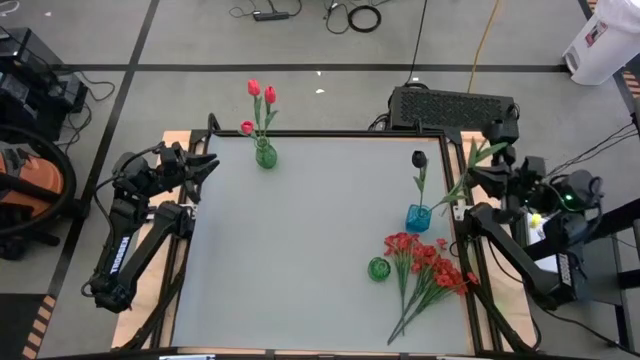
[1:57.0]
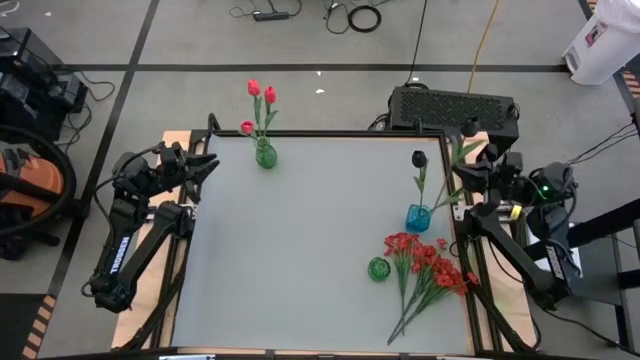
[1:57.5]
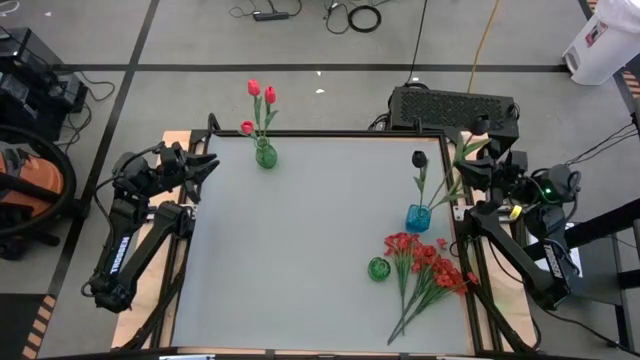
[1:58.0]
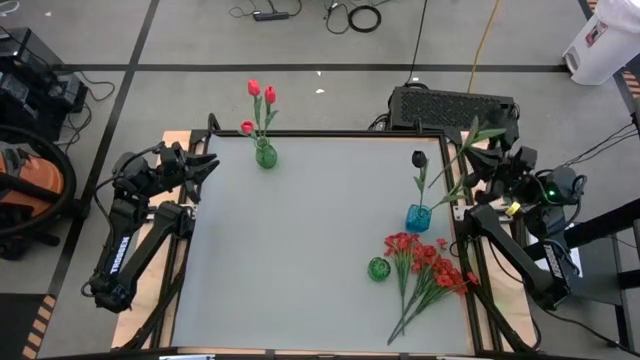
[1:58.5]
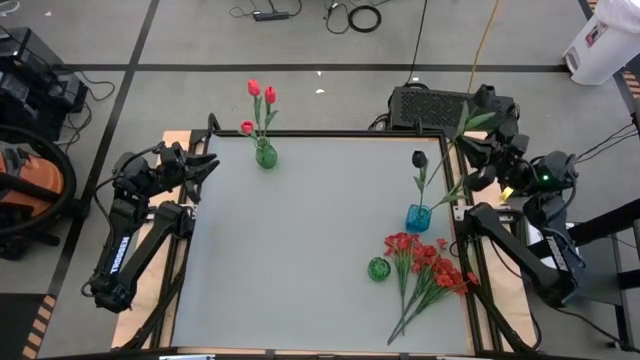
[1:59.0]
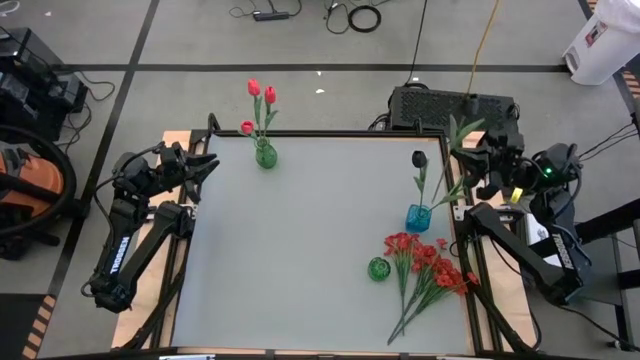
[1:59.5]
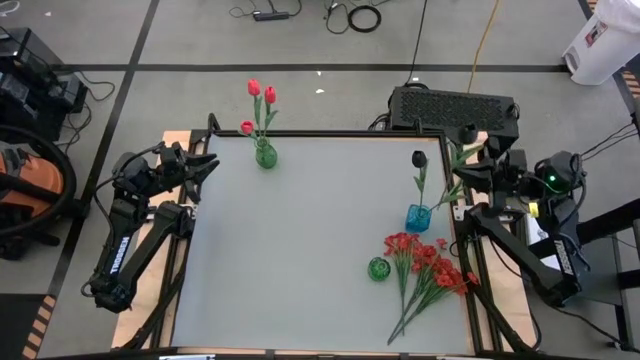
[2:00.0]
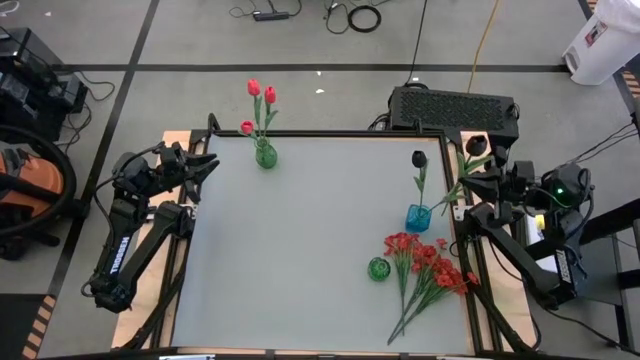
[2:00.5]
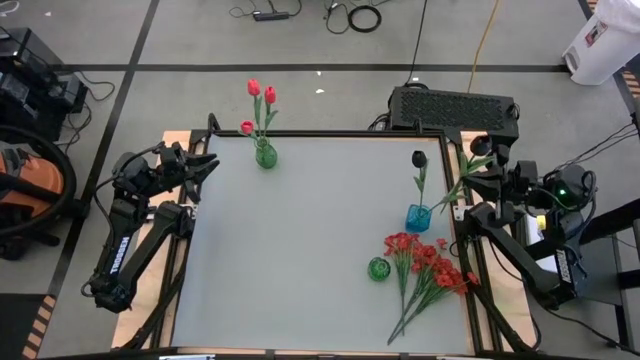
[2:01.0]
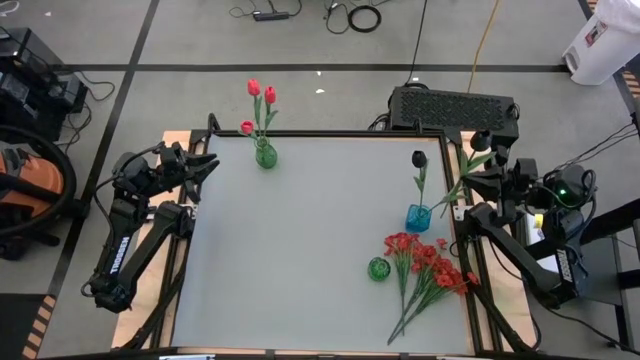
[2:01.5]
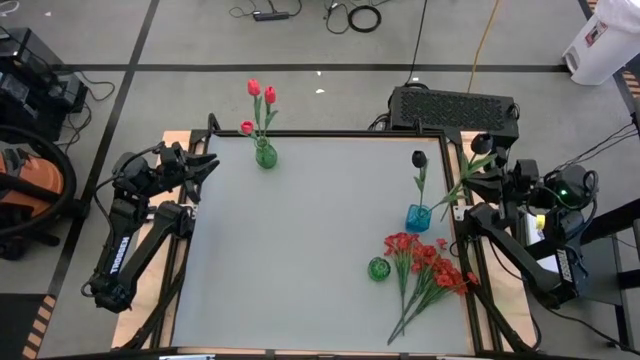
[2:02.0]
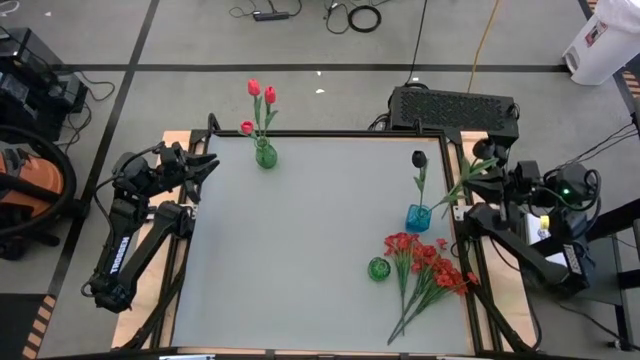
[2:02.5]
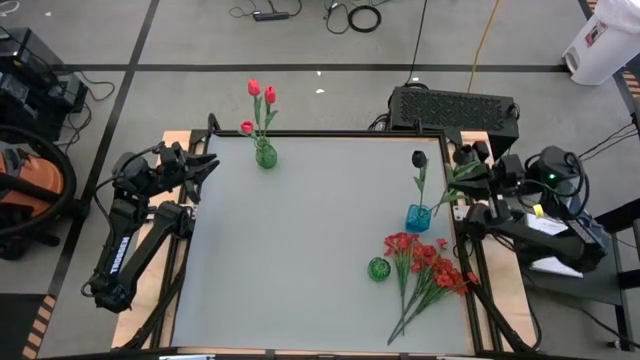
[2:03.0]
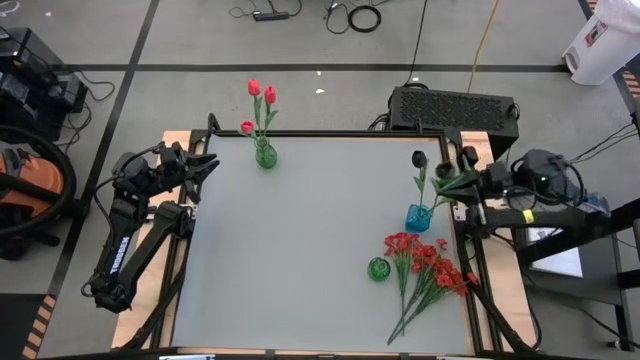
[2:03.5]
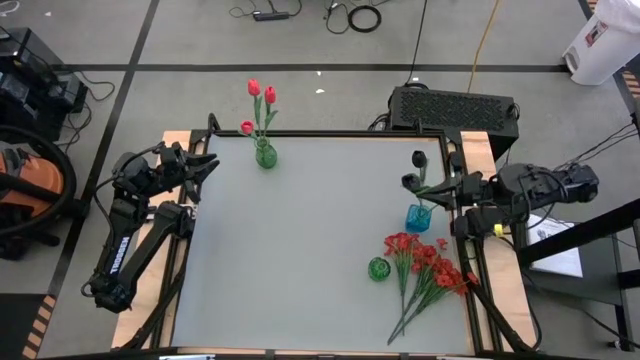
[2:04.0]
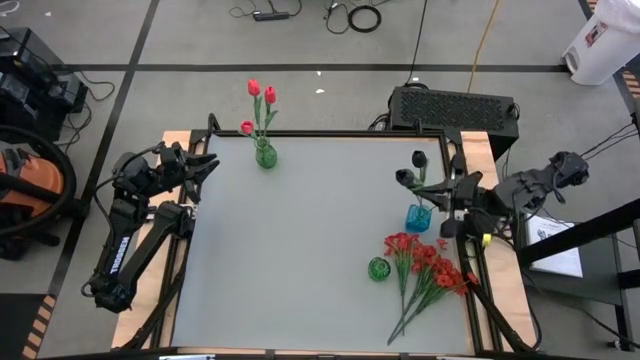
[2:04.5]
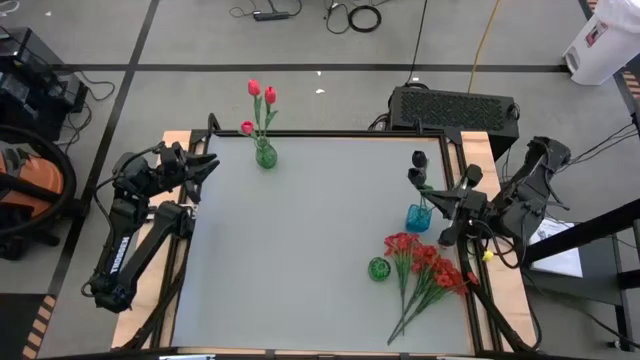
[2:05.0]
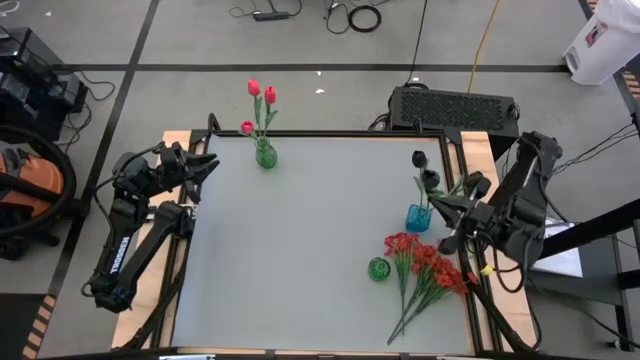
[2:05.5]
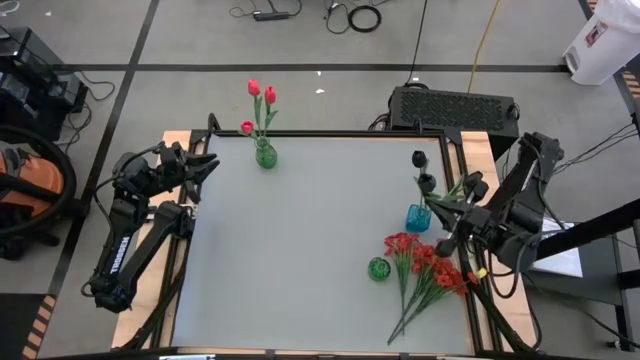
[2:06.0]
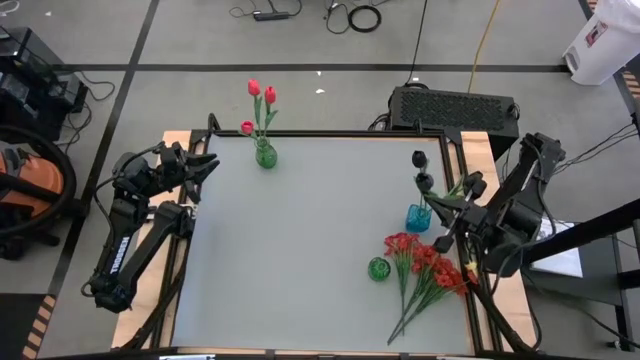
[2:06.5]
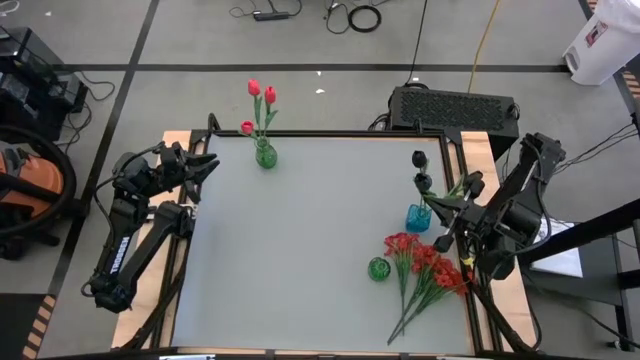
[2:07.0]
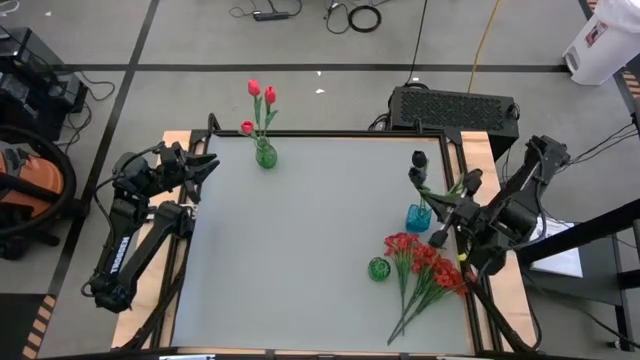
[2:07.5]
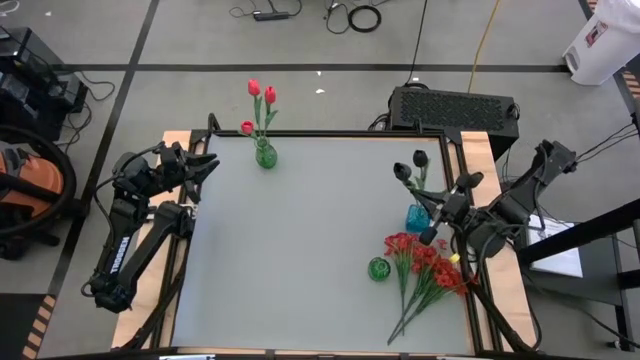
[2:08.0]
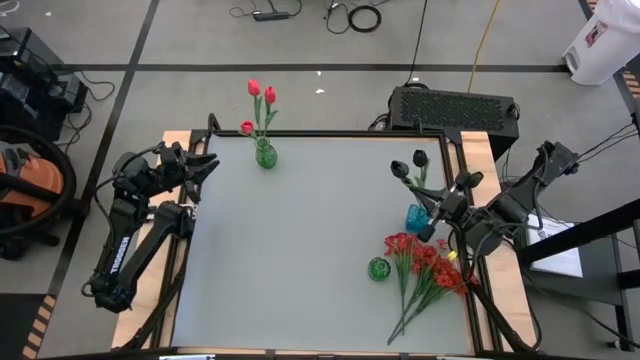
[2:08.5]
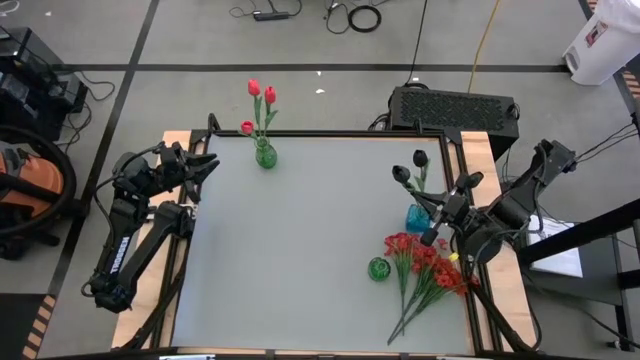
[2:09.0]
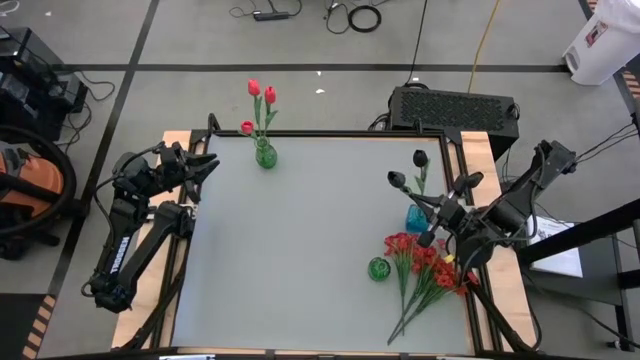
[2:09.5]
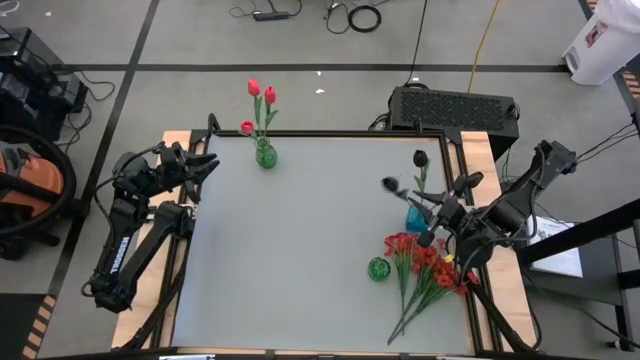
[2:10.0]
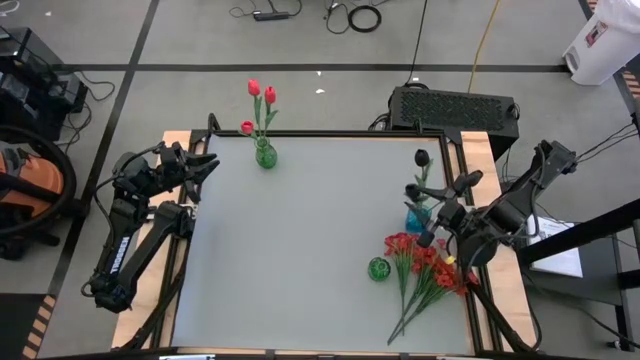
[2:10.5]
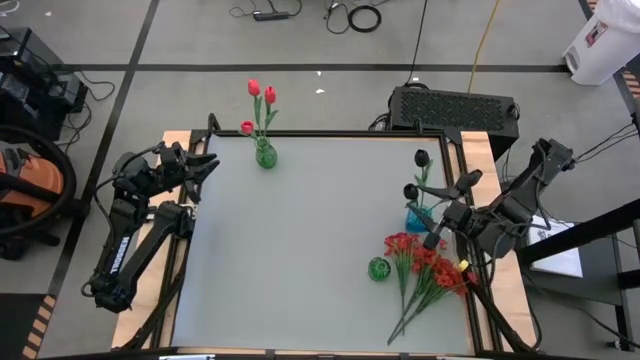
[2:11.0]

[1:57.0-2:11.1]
Task: Sort flowers into vase by color
Put the black flower into the right green vase

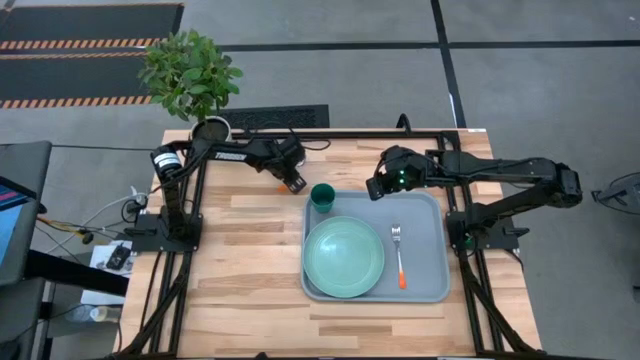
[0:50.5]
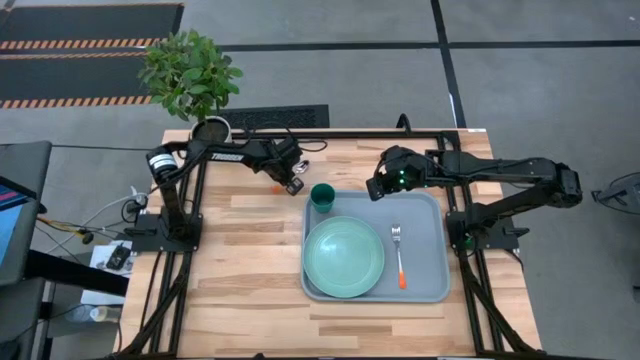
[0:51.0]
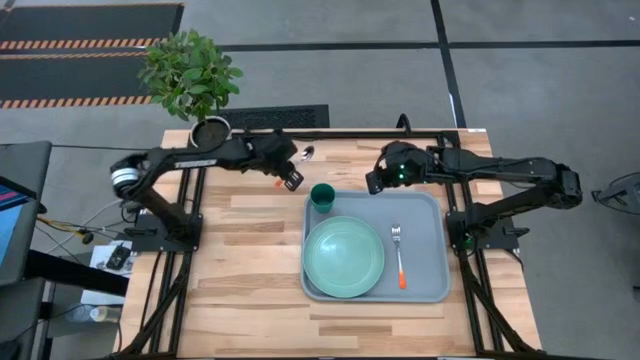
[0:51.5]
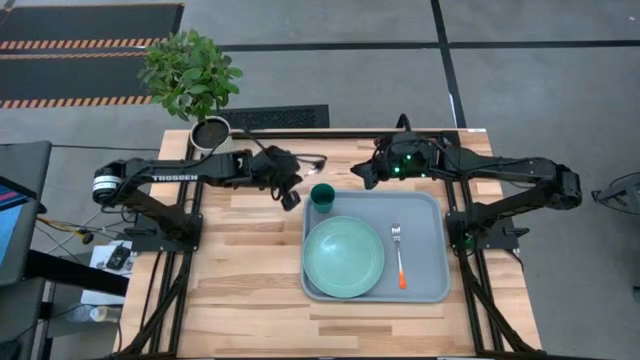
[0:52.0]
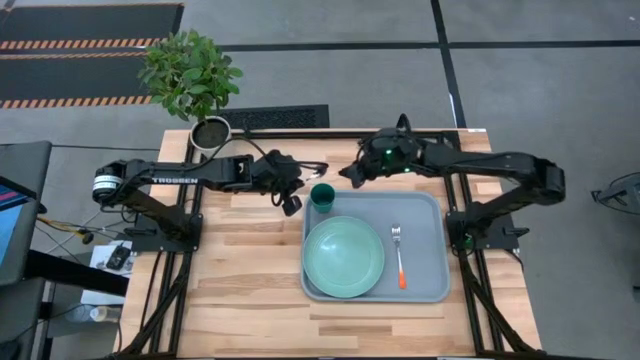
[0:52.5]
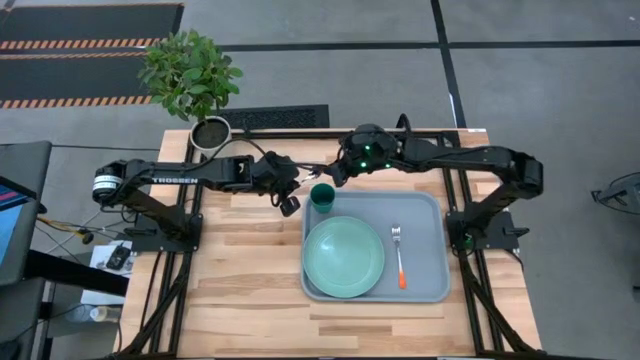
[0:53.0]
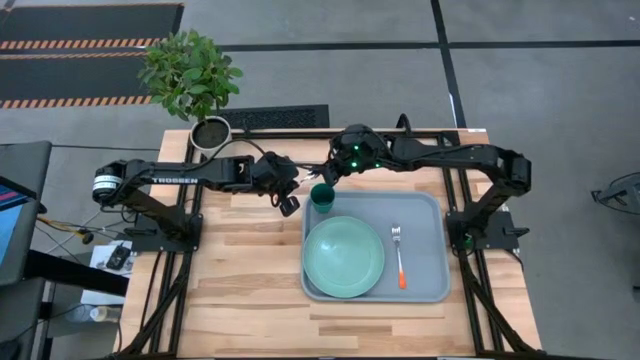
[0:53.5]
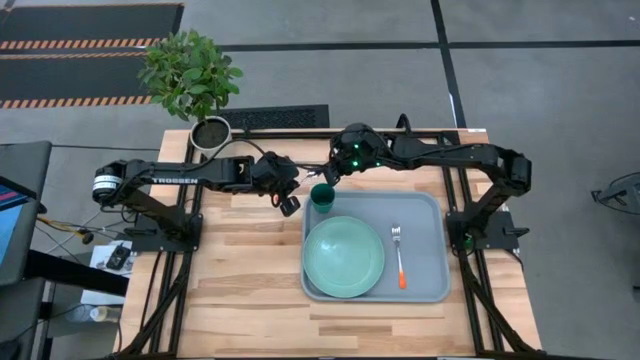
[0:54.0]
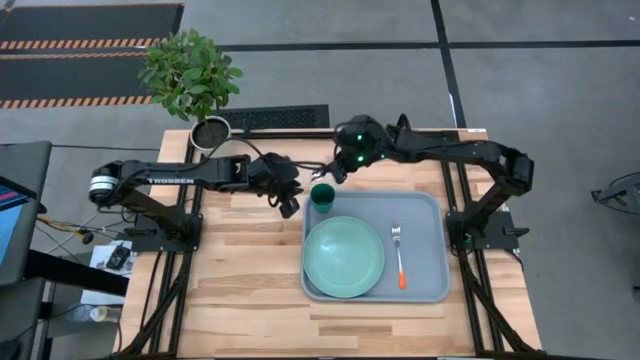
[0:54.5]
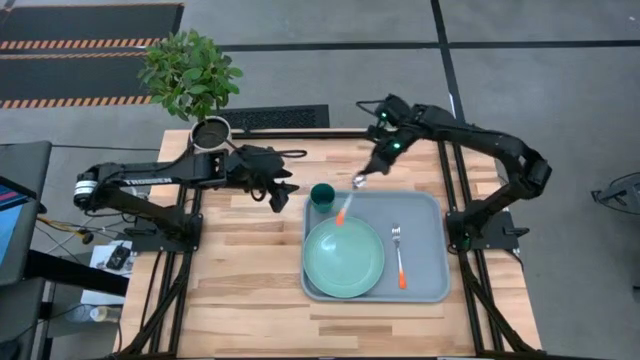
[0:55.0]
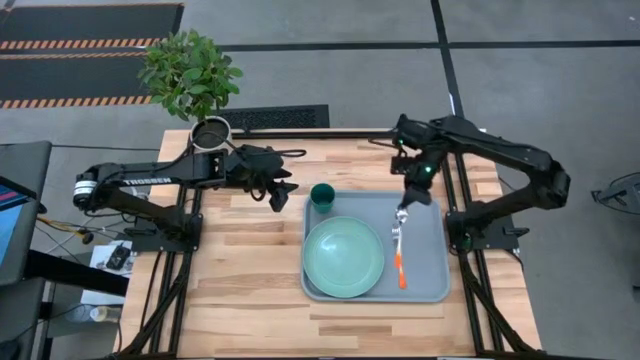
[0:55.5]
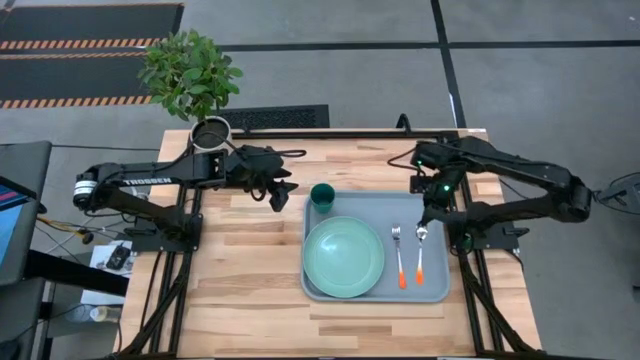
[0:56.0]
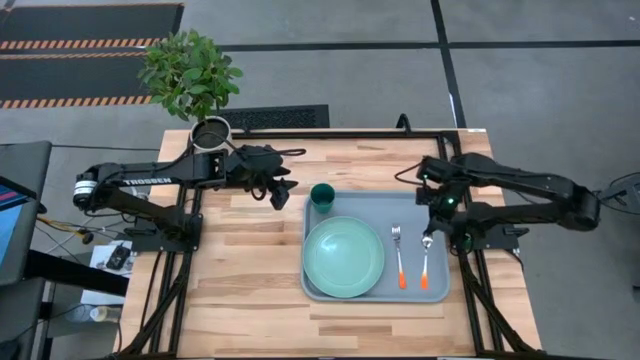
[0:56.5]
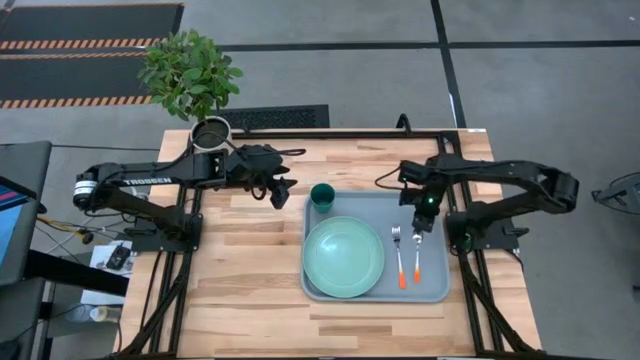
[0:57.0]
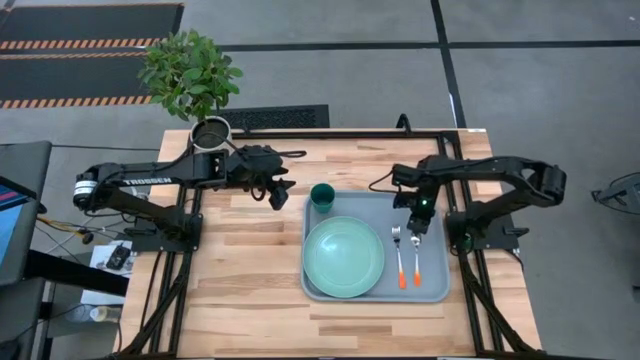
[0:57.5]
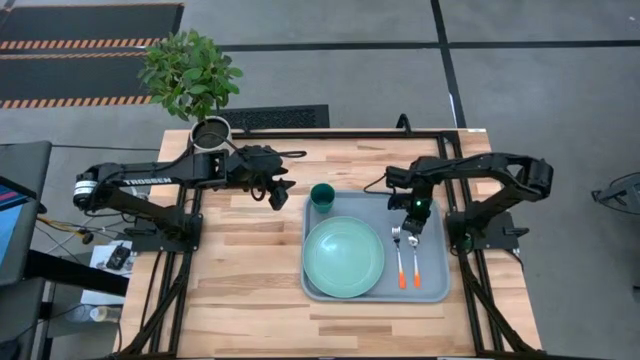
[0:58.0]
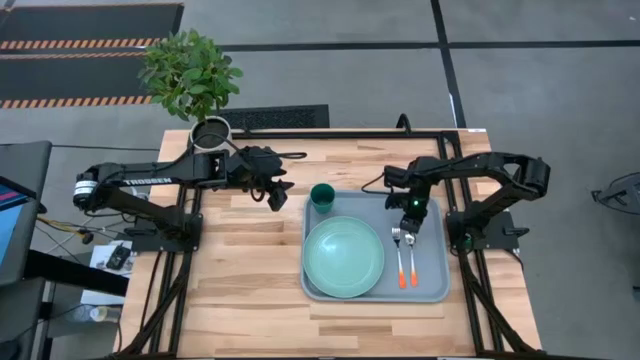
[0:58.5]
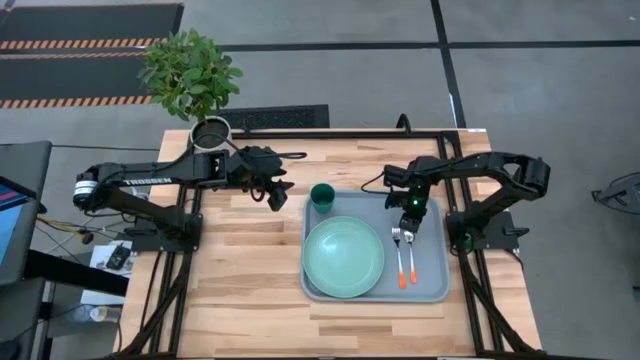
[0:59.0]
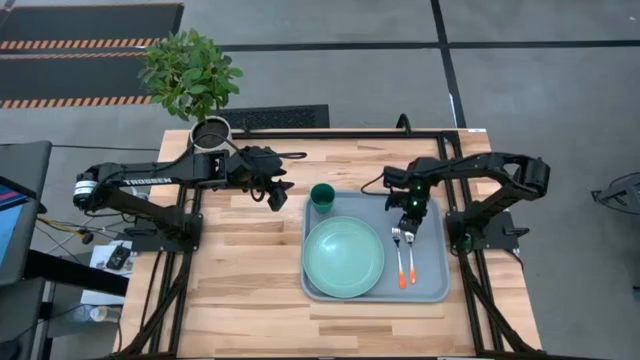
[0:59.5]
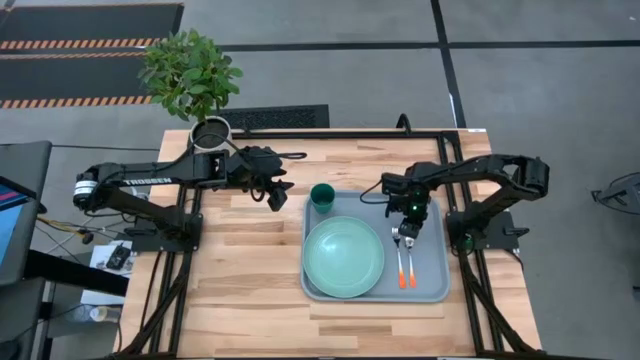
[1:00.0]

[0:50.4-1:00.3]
Task: Pick and place plate/cup/fork/spoon on tray
Put the orange spoon on the blue tray to the right of the orange fork
